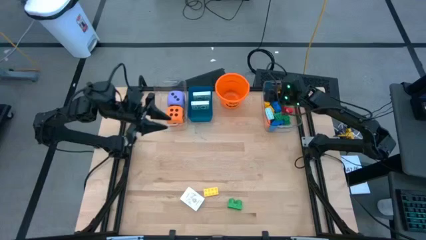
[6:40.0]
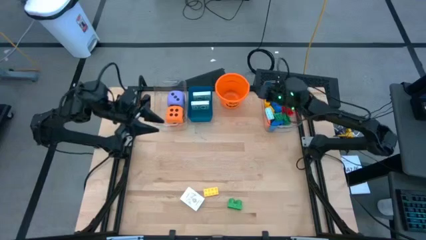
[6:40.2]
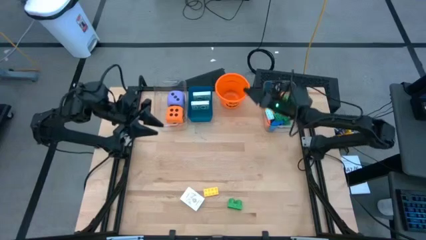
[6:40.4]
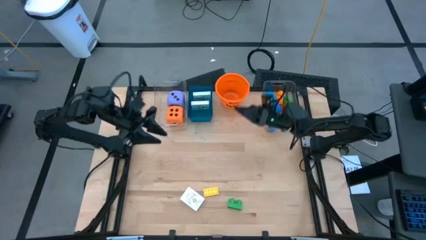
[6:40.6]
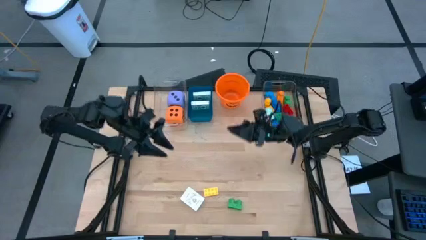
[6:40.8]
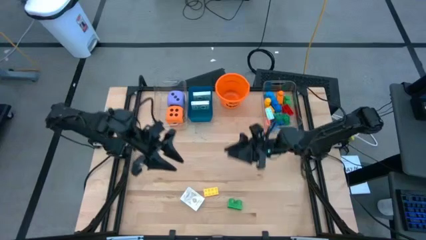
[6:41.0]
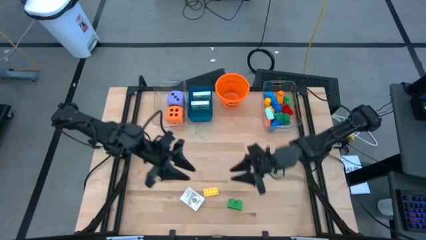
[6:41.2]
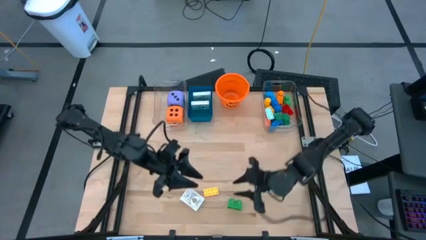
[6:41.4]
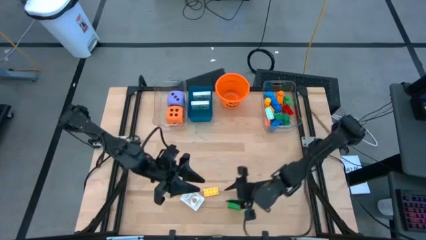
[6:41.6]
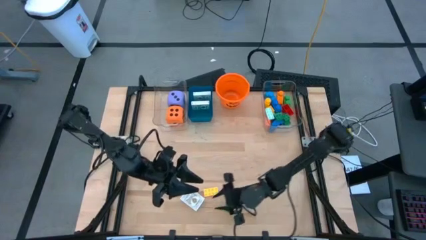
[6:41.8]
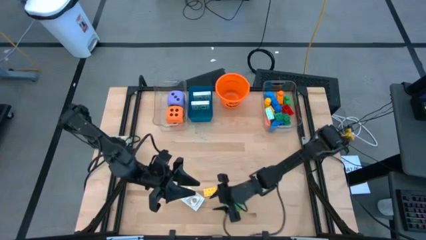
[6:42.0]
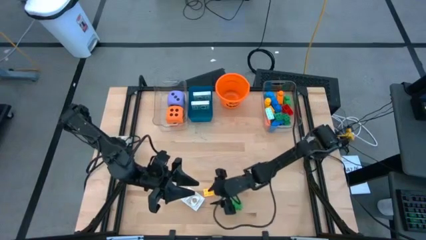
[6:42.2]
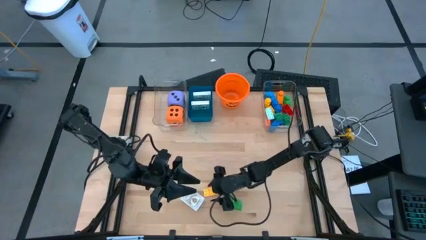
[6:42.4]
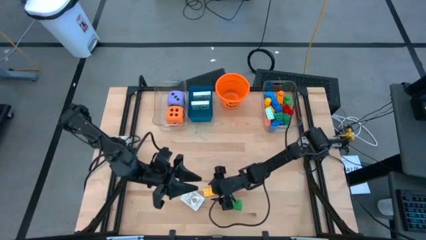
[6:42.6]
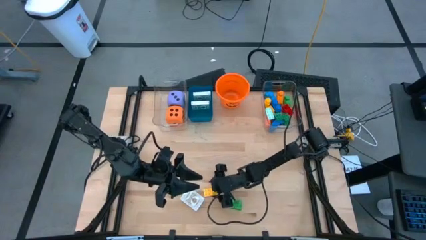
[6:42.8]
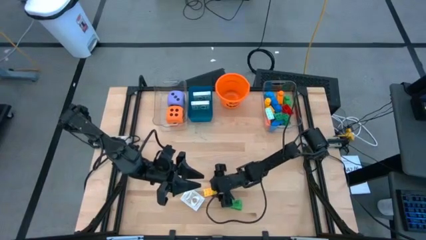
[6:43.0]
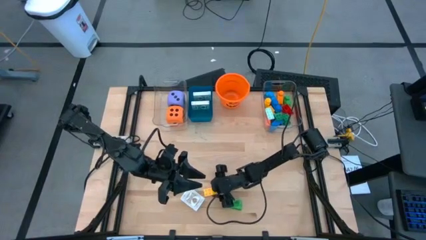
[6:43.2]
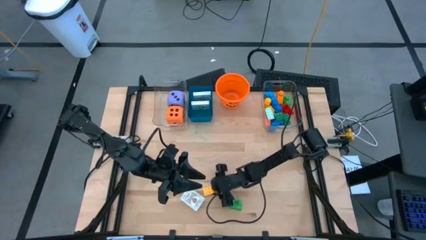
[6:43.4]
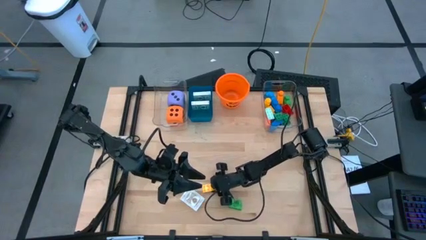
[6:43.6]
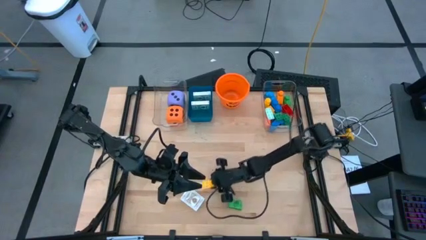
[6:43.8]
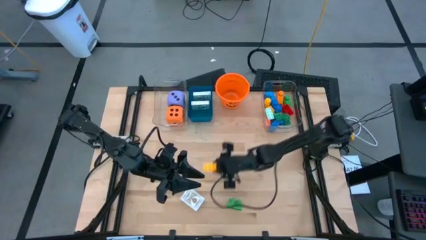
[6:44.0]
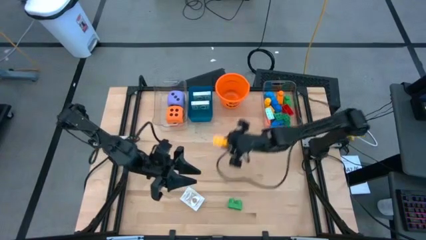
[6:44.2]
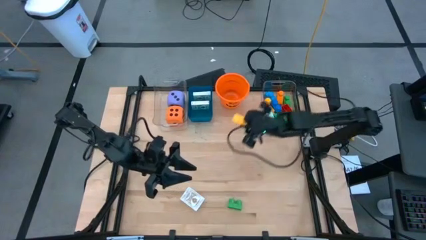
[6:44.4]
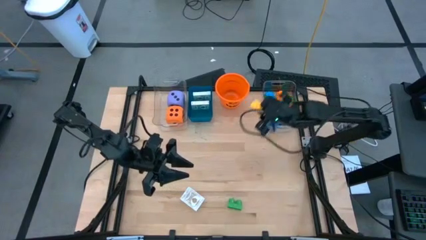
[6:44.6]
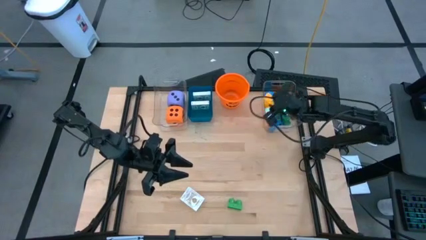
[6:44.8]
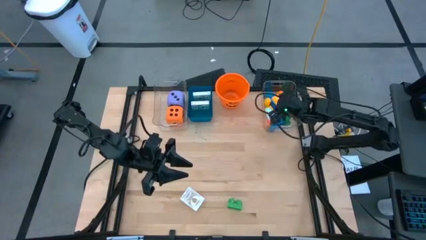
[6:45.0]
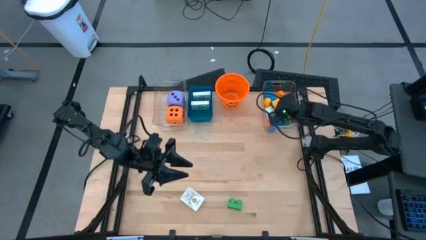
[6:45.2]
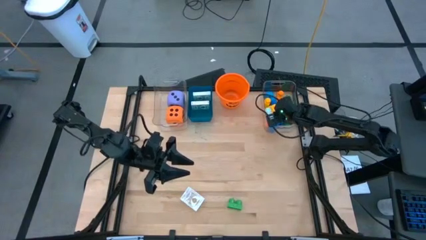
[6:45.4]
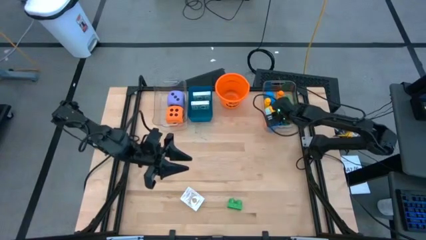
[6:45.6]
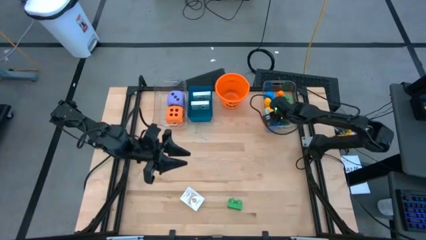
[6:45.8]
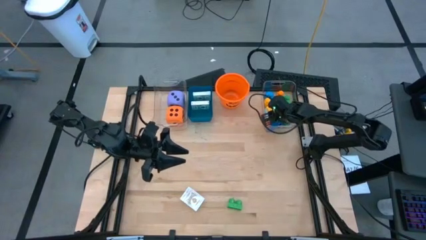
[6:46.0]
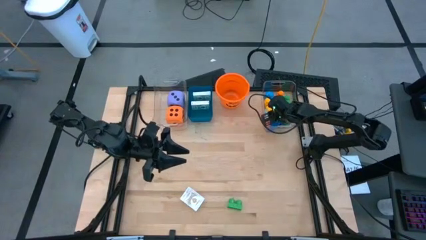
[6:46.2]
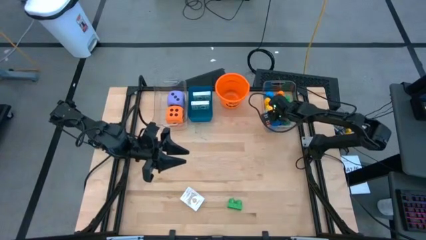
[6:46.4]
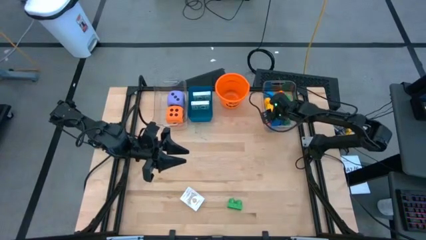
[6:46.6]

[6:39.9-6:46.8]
Task: Pick & Place Toys
Put the yellow game piece into the right transparent bin

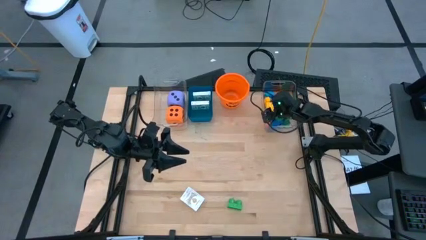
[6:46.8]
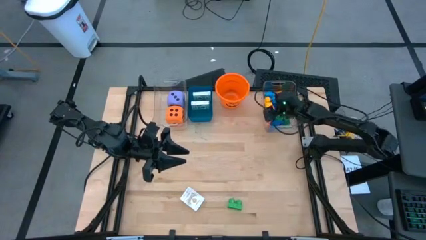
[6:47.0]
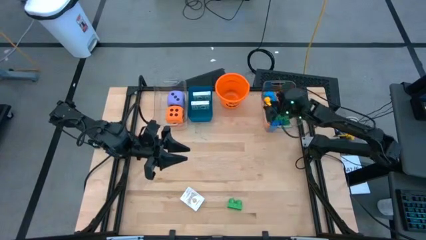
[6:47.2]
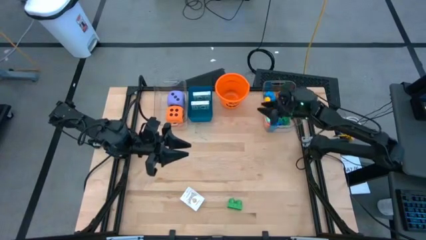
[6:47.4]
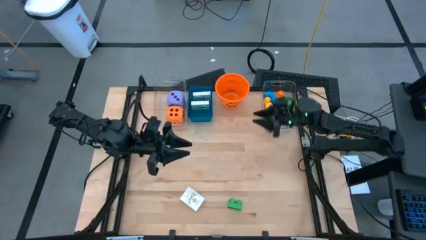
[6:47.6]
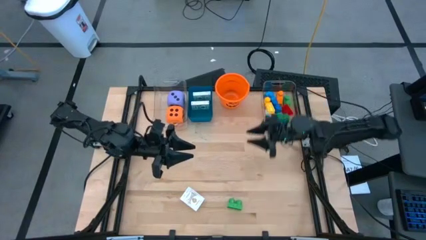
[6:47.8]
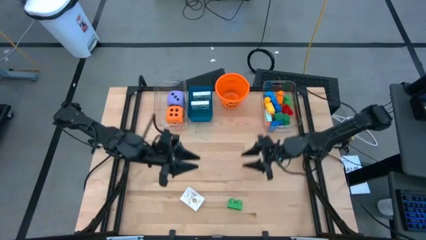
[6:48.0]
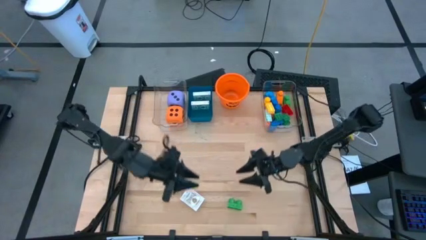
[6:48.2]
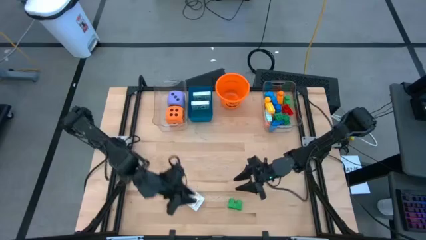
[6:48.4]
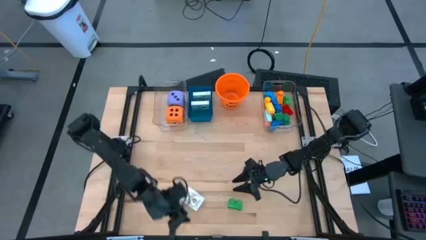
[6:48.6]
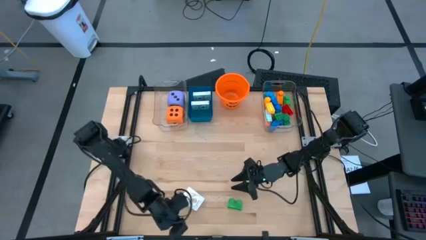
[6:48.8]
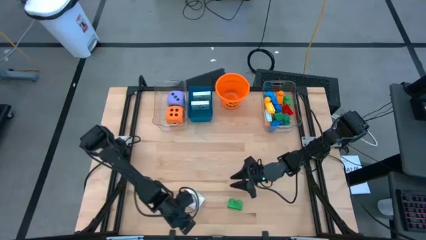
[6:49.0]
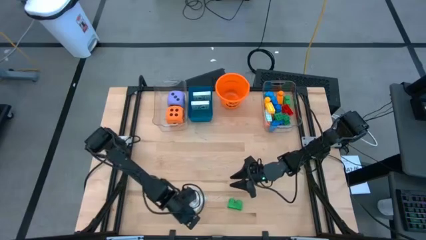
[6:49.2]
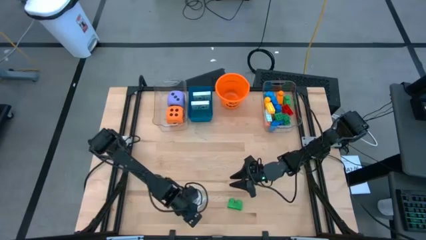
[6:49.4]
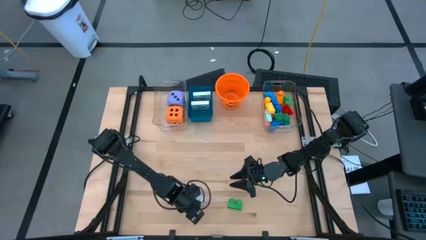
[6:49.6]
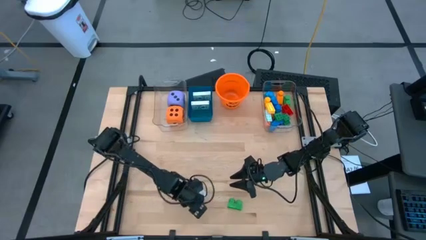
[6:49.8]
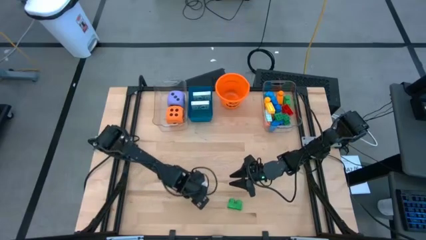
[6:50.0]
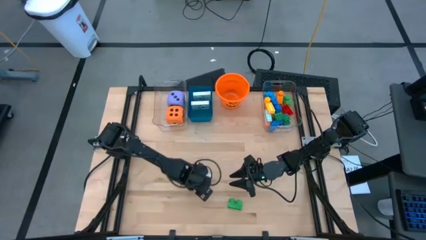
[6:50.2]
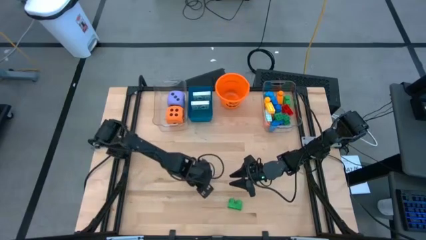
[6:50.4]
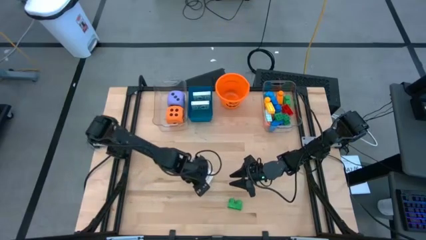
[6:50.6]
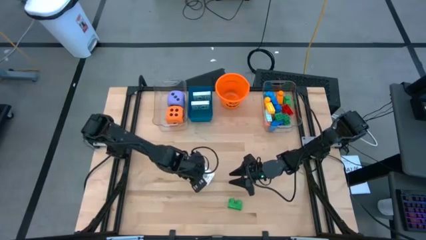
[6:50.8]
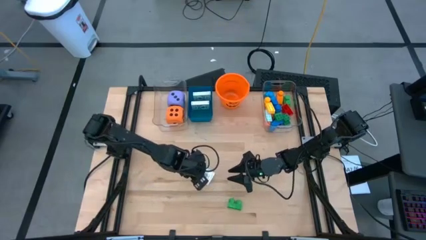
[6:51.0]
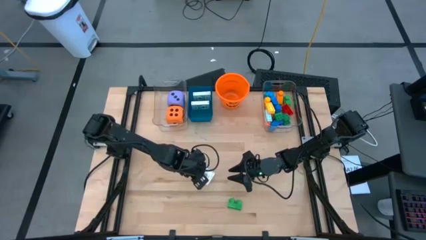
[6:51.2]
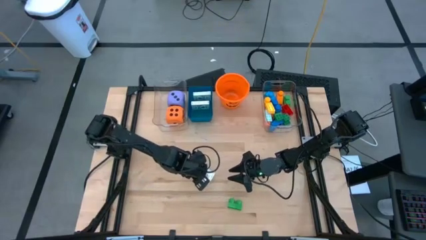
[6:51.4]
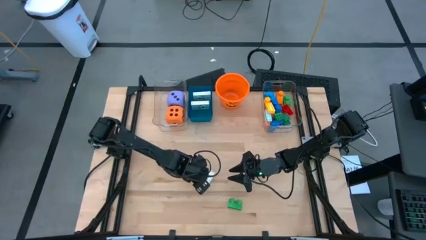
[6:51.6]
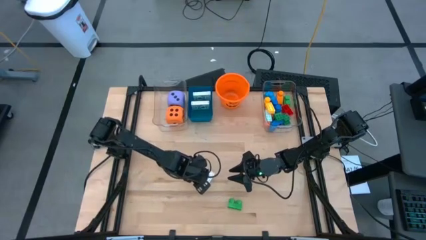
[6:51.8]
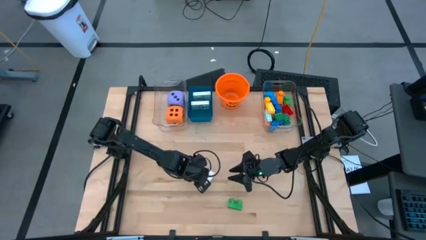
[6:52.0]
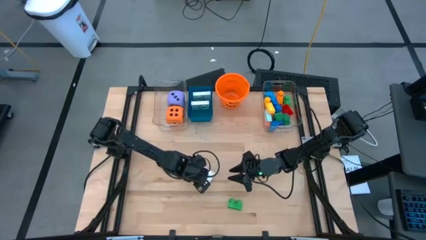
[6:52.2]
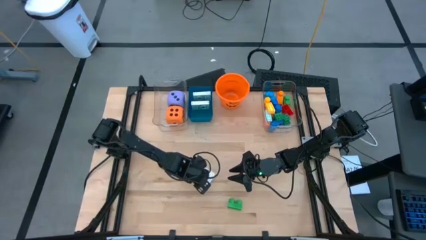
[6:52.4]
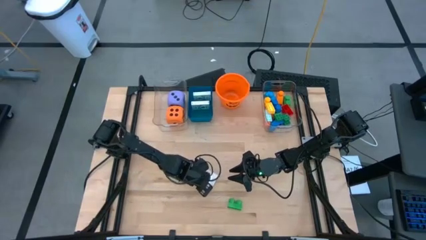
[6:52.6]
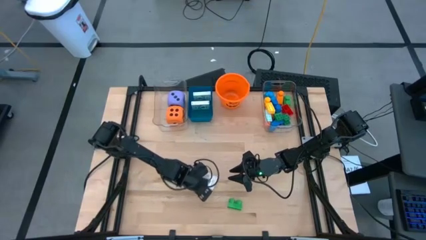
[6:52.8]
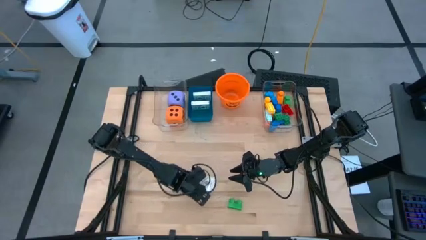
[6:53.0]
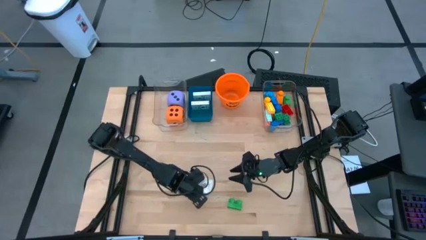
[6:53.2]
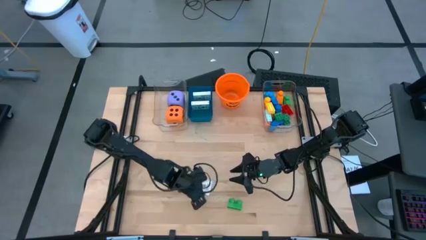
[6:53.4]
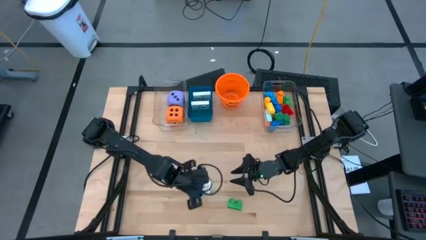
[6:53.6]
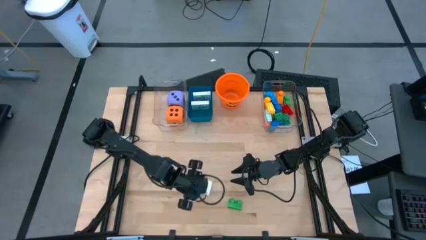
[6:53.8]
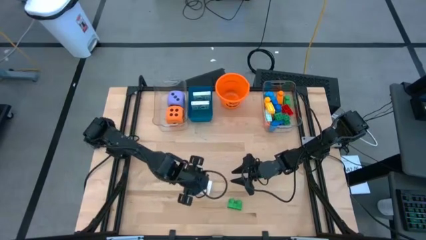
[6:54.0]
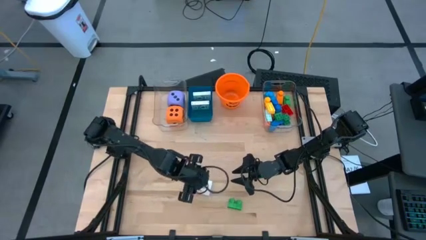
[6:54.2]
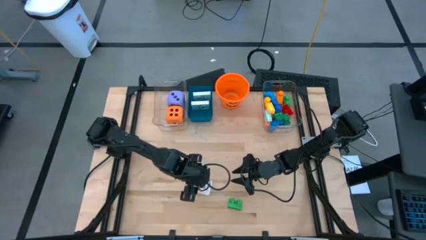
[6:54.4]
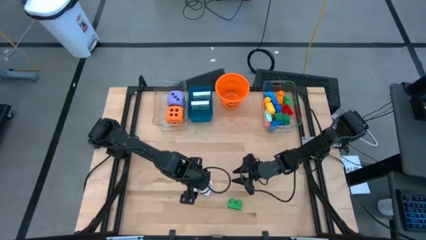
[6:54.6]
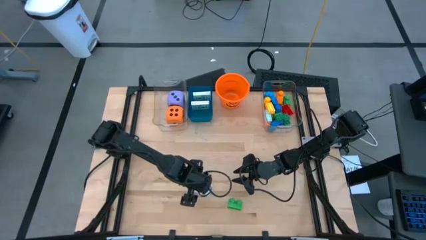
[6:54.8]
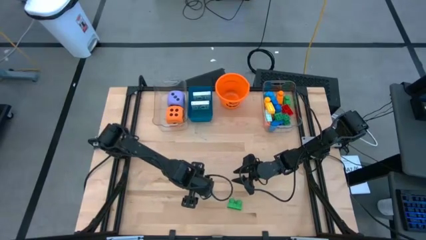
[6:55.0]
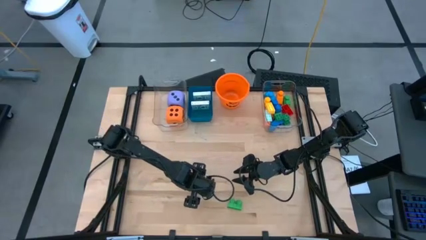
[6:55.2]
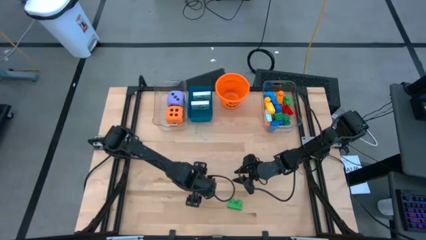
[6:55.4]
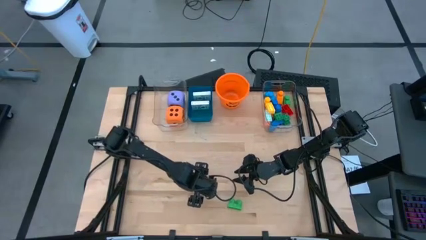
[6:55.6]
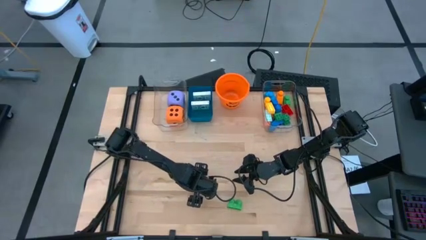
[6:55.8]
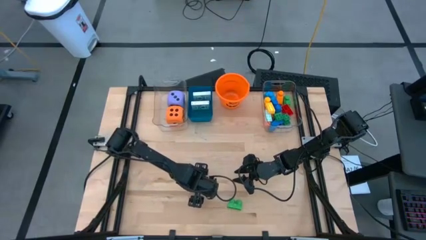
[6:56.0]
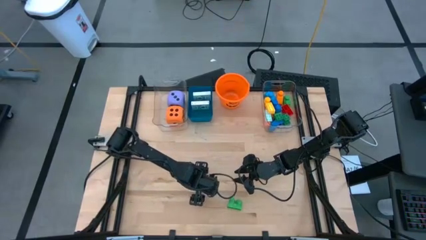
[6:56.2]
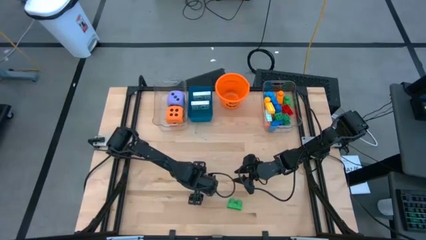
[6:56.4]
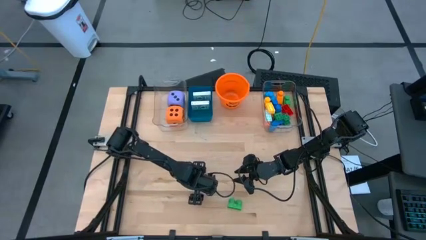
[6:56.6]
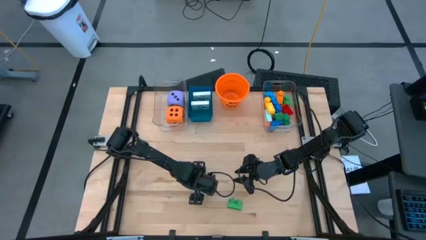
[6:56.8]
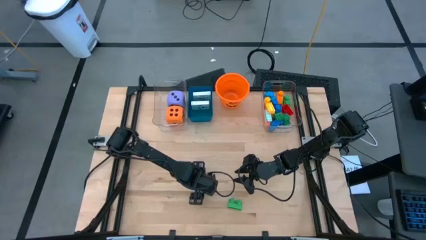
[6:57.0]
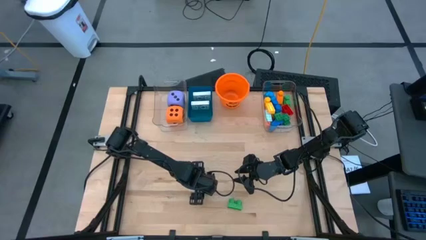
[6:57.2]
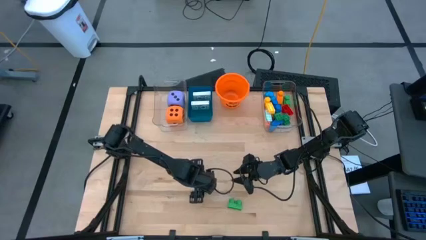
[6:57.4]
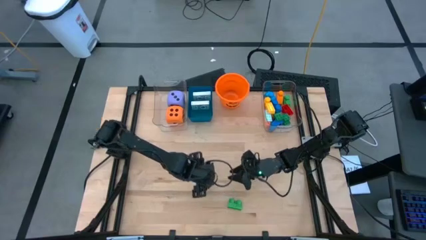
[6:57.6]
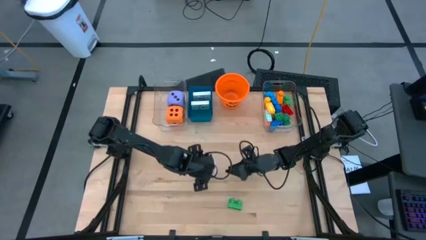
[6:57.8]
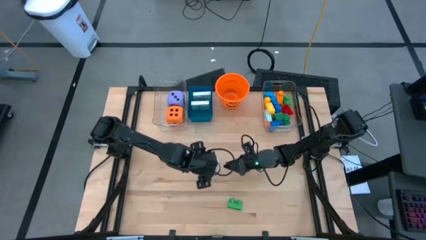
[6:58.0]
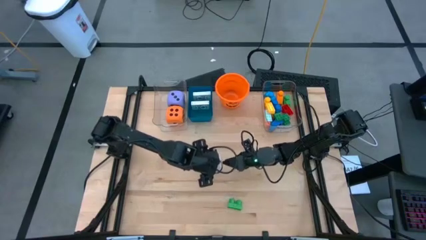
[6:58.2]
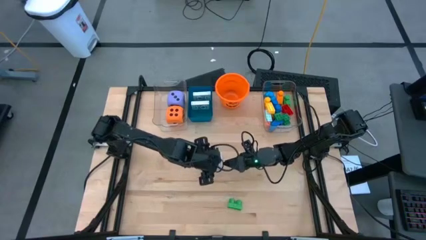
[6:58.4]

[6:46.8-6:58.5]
Put the gold deck of cards into the blue bin
